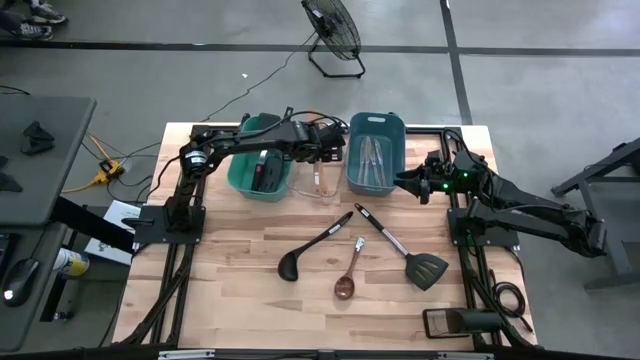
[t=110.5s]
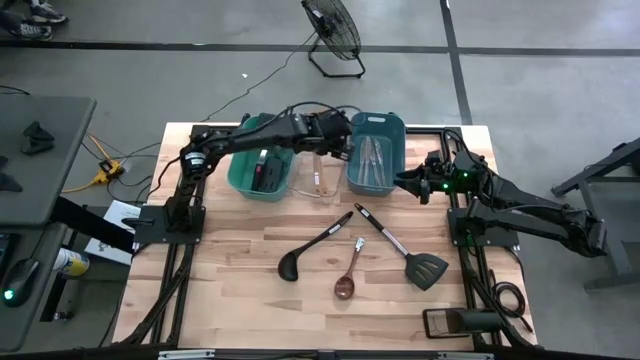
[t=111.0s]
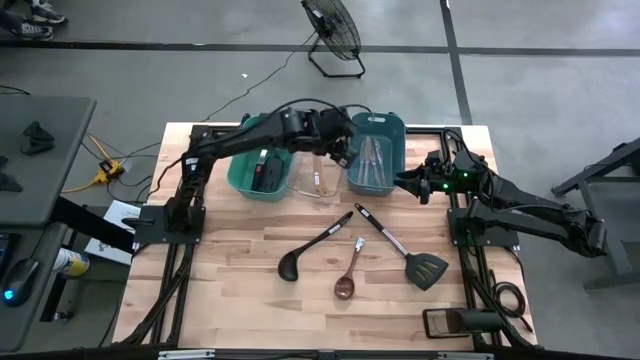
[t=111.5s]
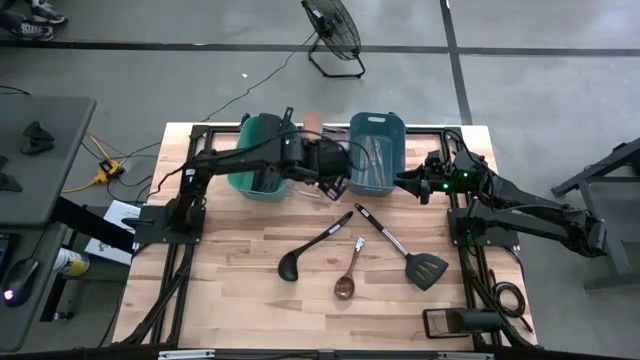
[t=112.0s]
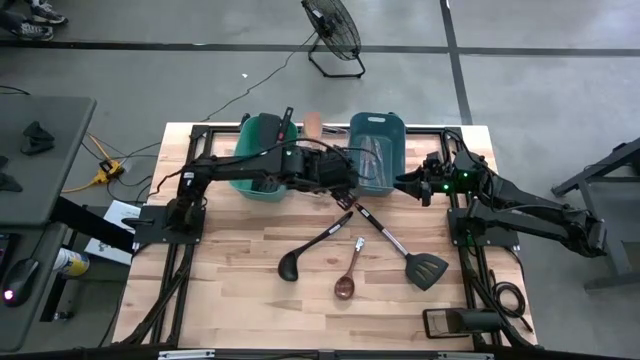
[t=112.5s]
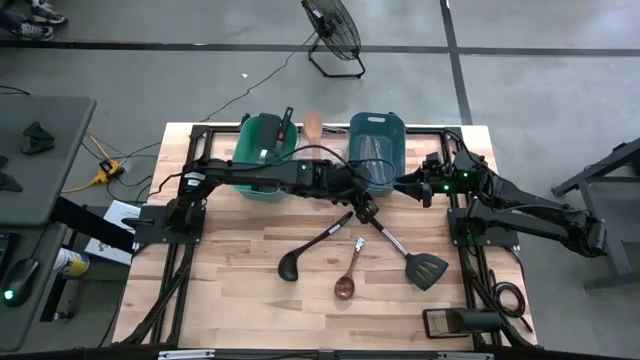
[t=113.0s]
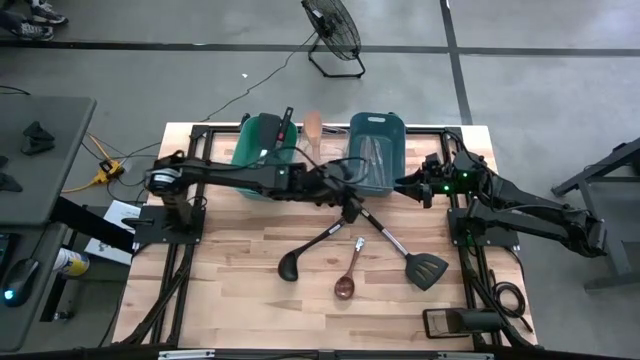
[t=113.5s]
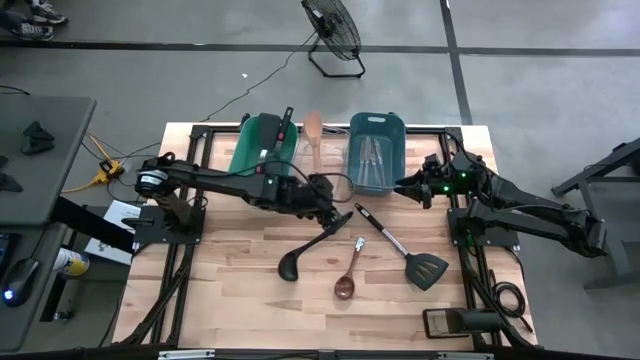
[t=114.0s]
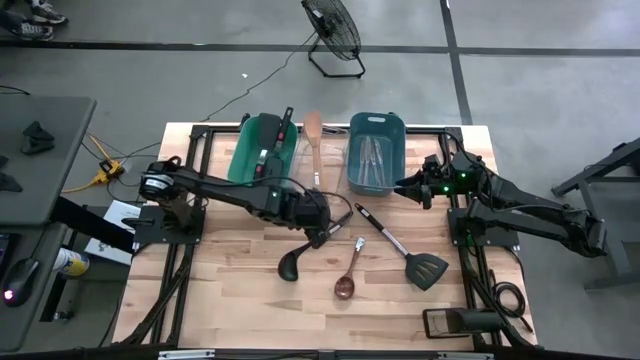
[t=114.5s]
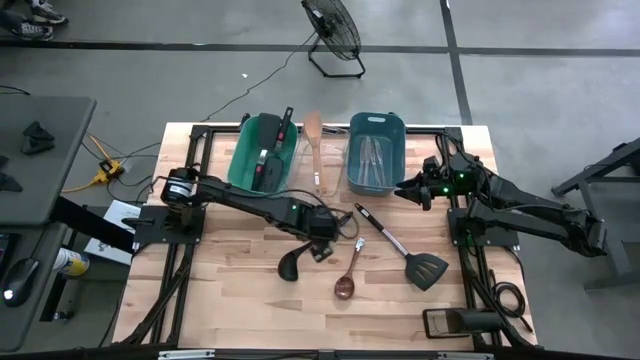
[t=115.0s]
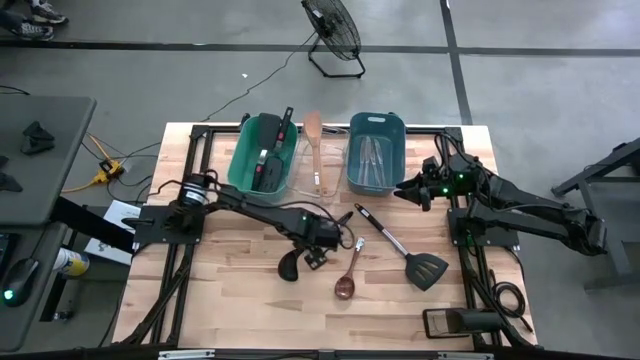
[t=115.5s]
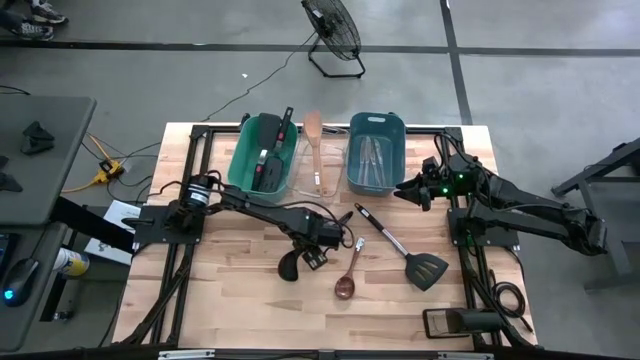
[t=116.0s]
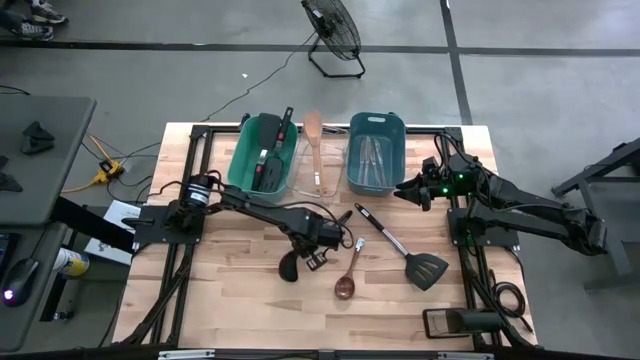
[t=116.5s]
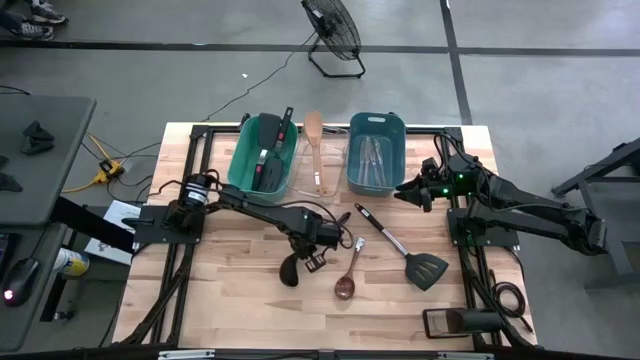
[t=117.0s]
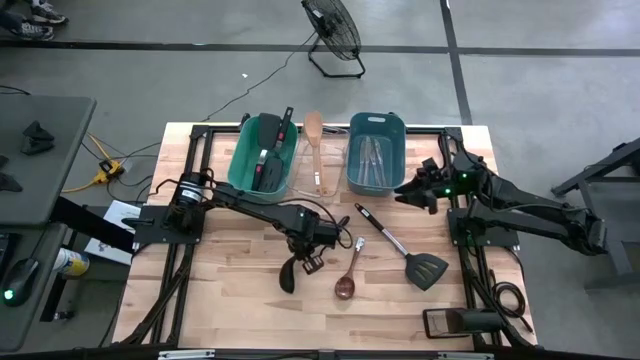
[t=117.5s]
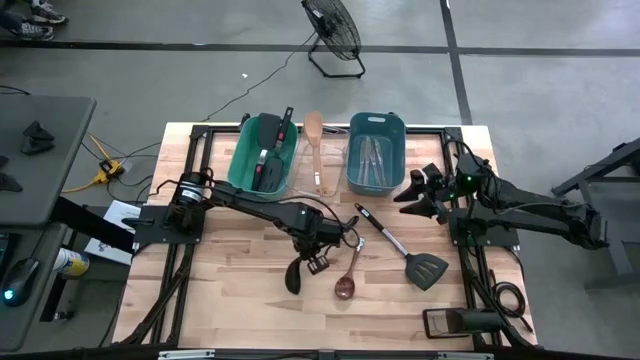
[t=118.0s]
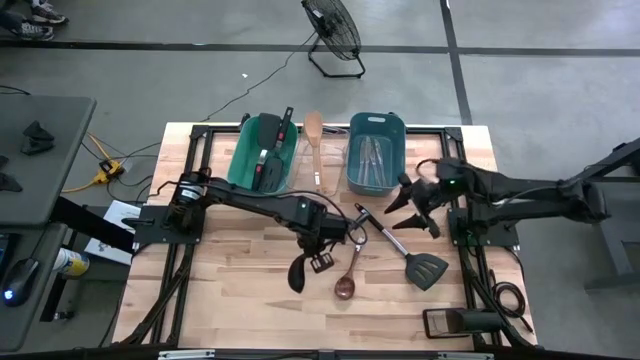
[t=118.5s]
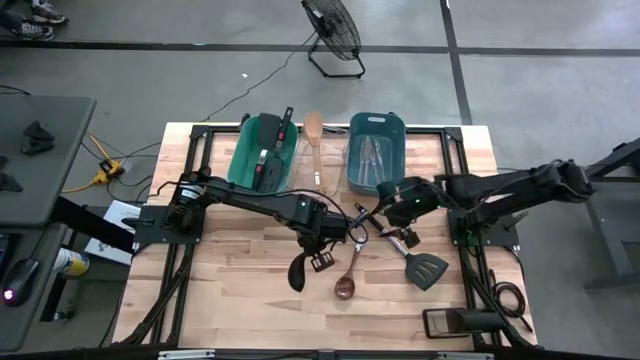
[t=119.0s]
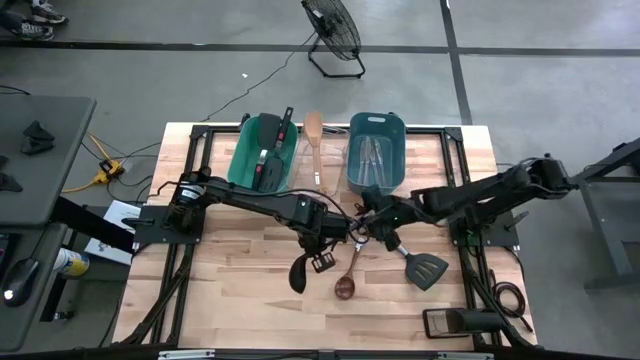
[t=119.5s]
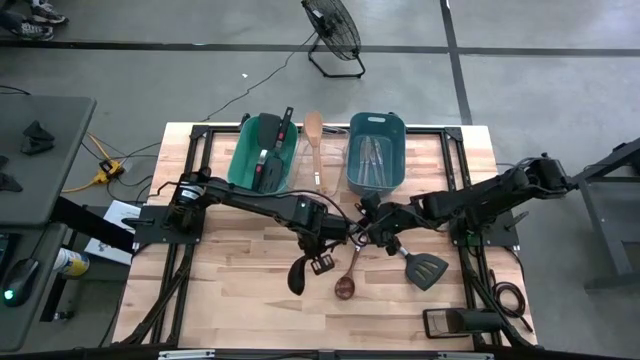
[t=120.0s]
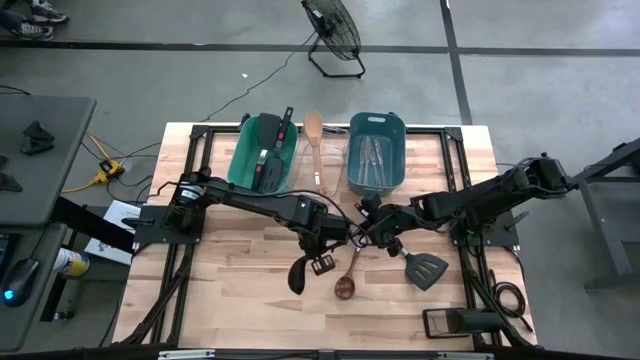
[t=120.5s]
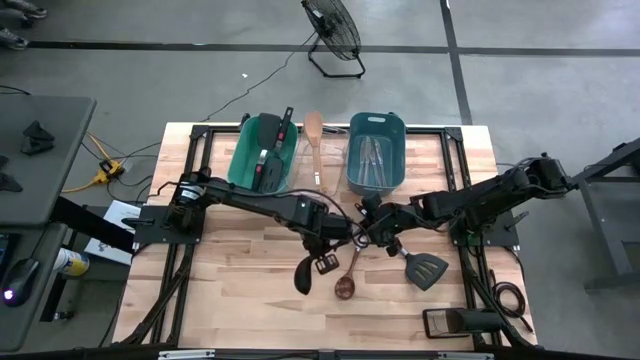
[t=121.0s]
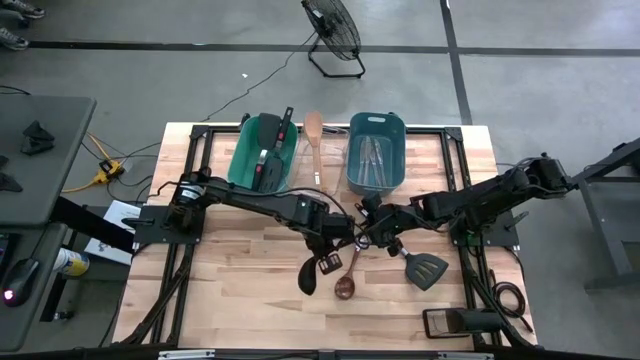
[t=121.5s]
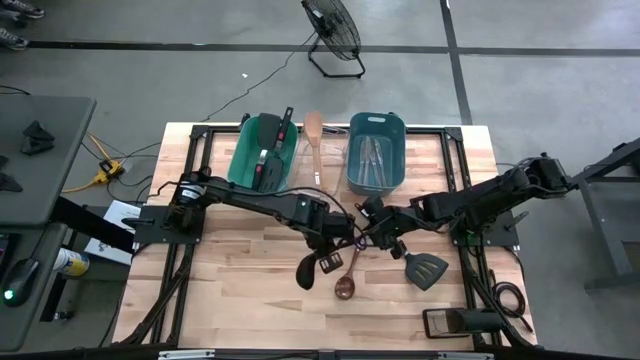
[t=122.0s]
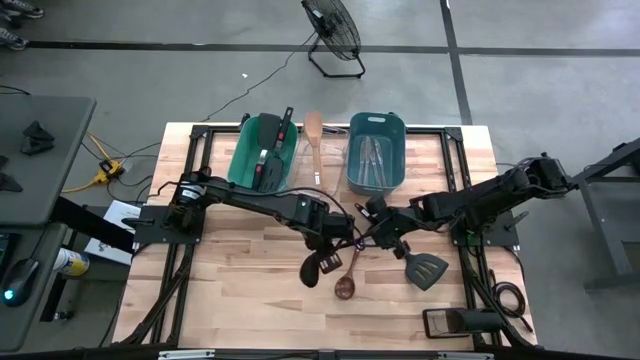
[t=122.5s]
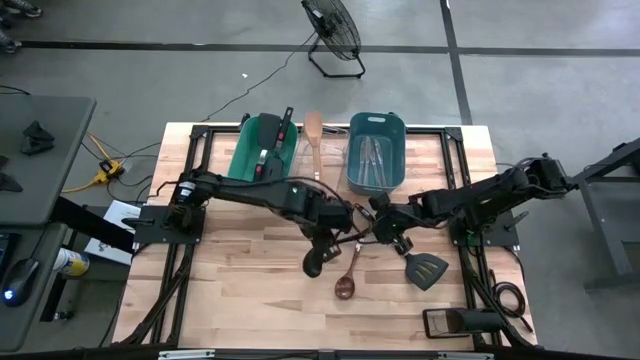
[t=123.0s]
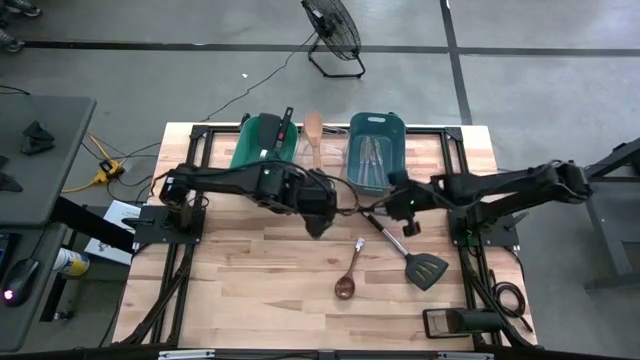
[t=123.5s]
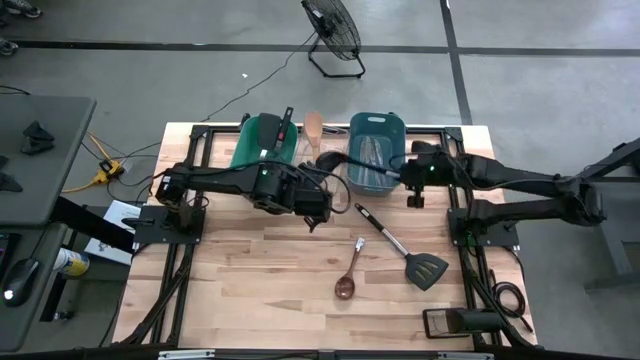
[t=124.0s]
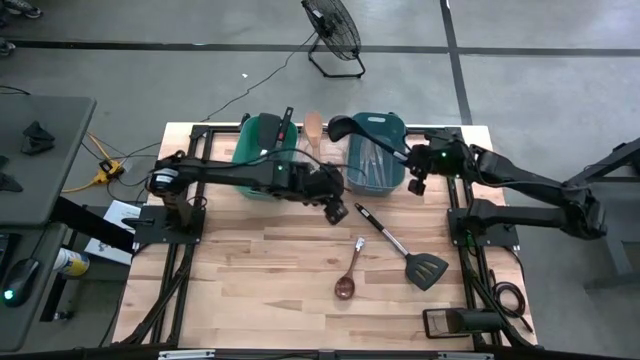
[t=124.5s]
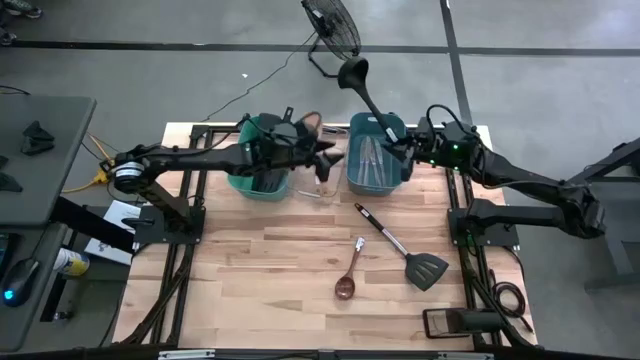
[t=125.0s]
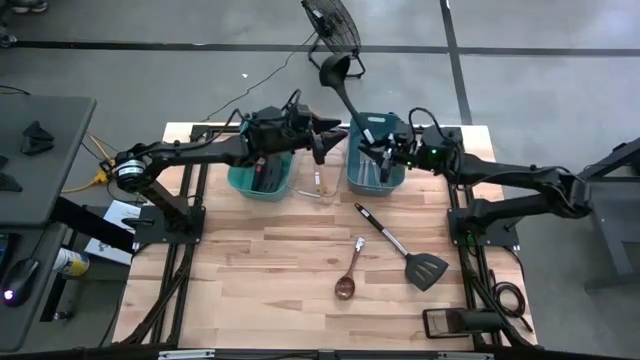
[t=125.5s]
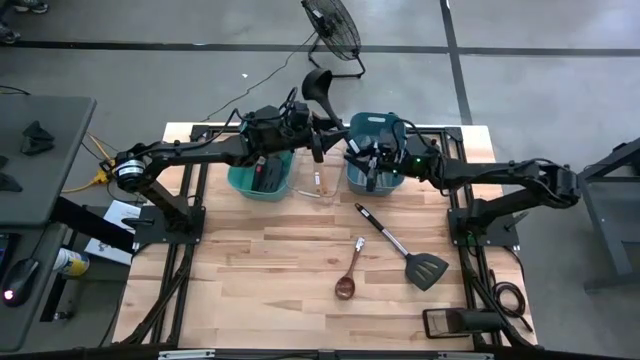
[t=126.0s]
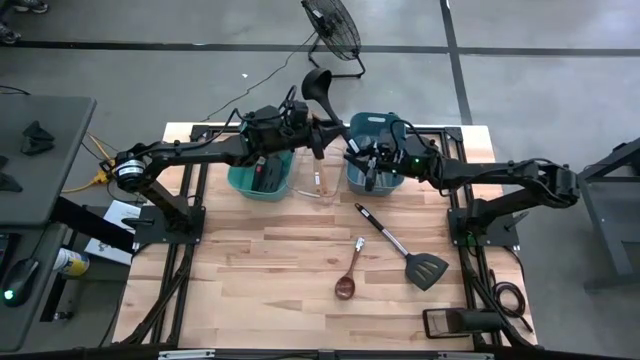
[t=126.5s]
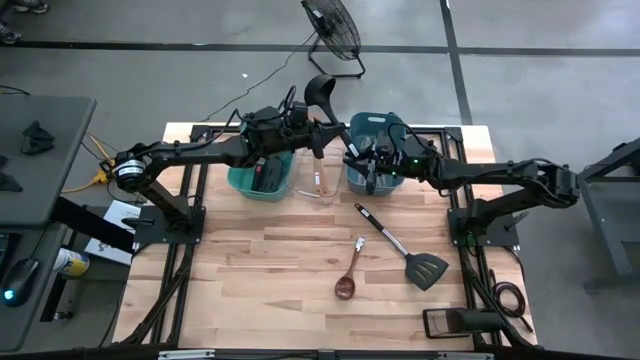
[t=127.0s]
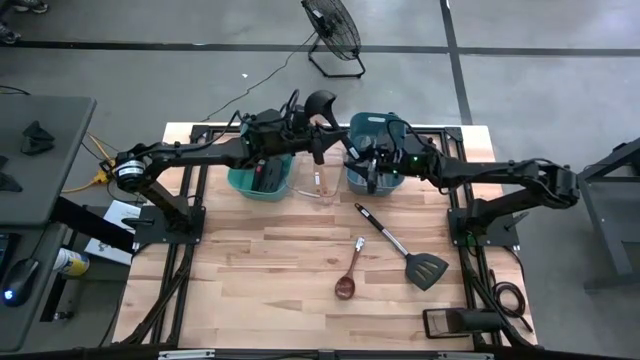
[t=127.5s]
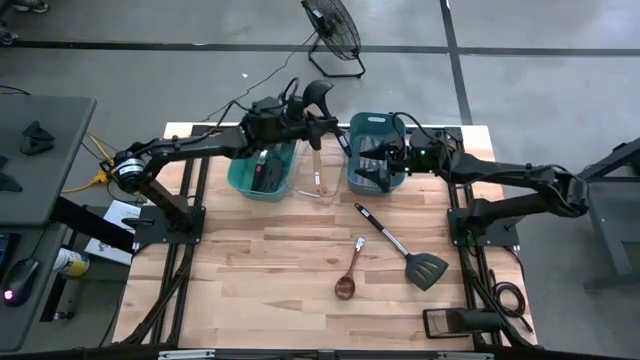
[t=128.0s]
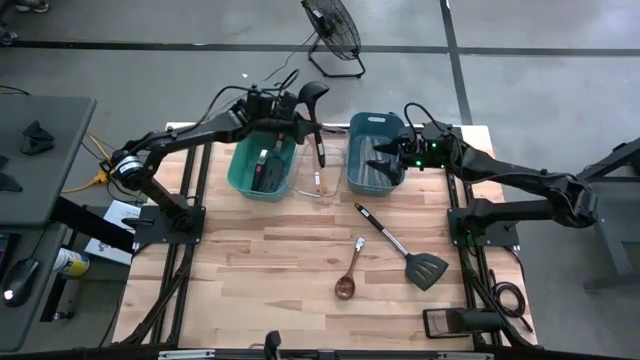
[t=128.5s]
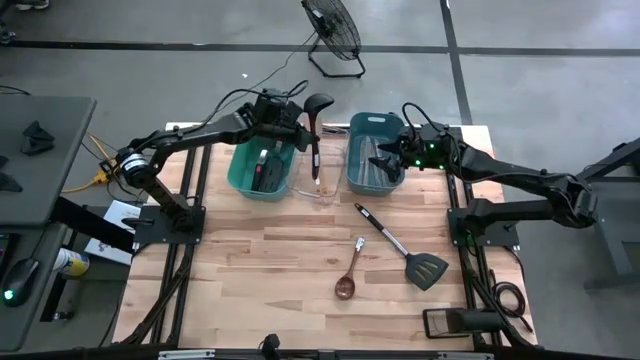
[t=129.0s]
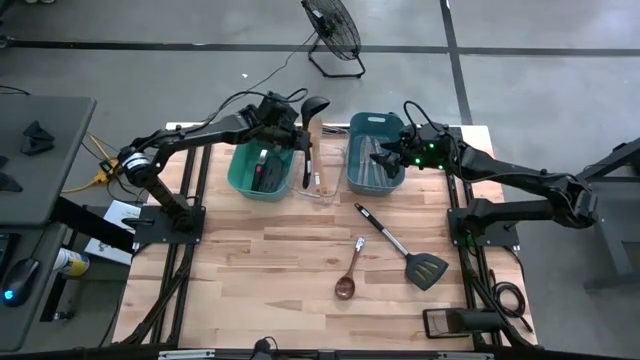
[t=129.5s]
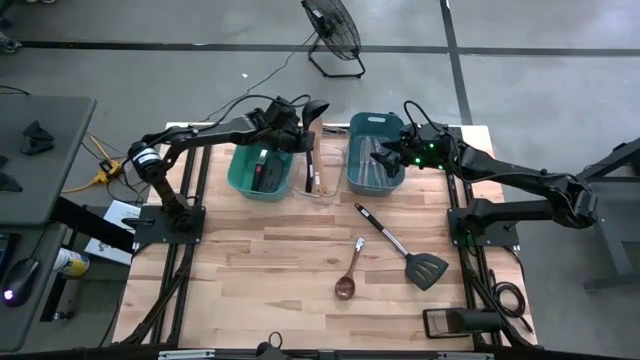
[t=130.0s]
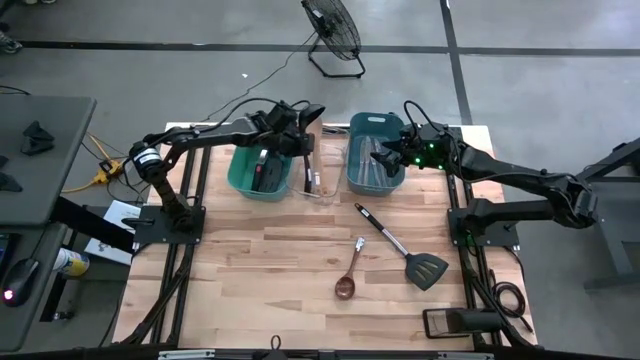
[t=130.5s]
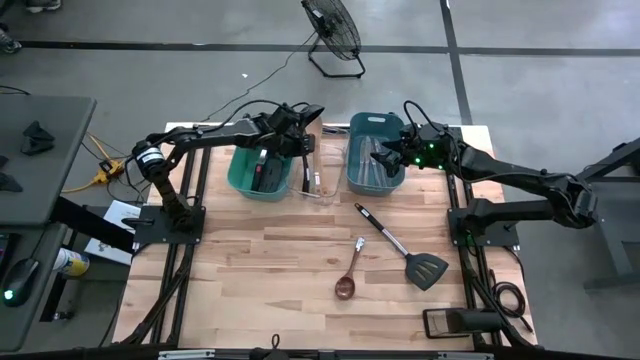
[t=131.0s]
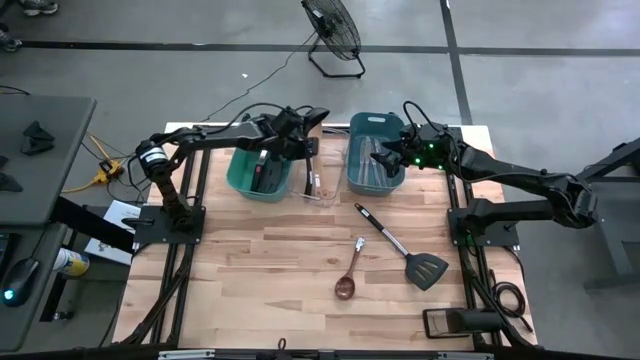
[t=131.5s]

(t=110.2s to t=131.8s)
Task: Pick & Place Kitchen Items
Put the black ladle into the transparent bin
